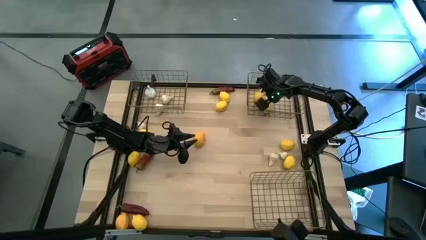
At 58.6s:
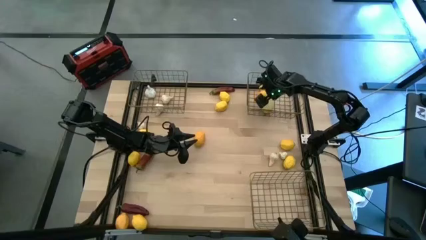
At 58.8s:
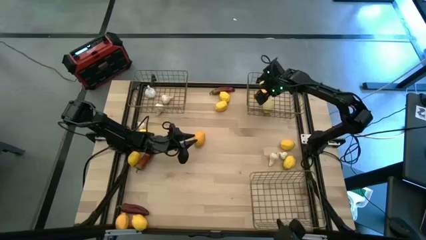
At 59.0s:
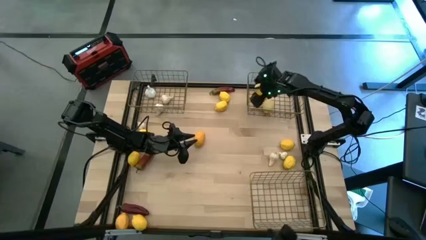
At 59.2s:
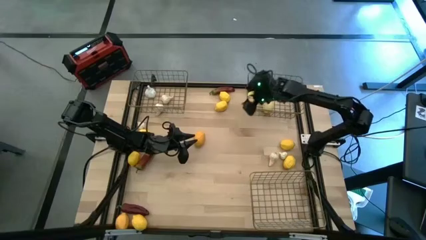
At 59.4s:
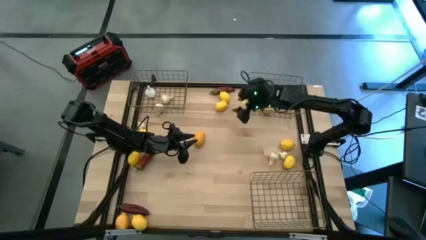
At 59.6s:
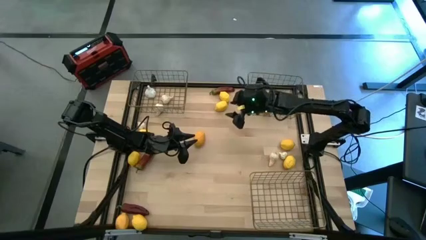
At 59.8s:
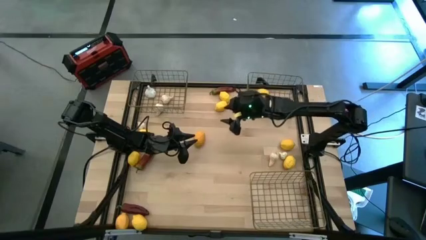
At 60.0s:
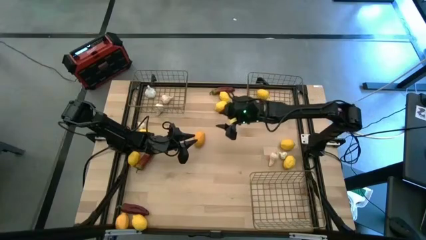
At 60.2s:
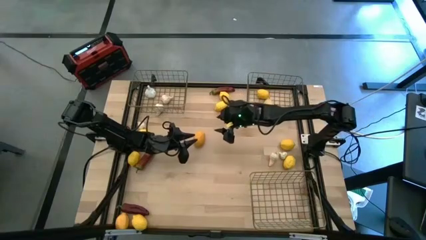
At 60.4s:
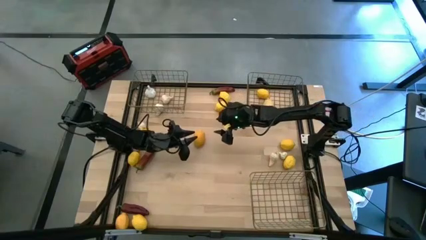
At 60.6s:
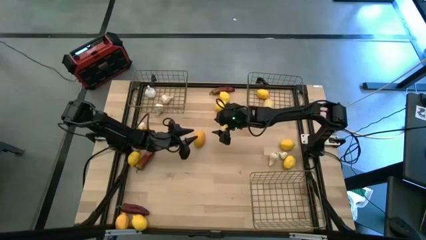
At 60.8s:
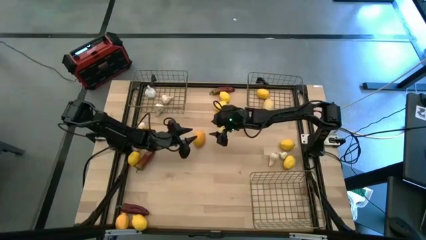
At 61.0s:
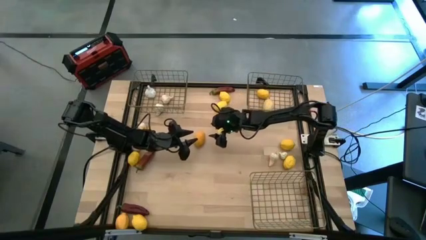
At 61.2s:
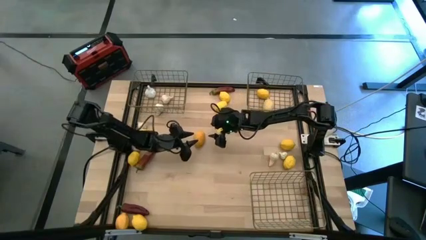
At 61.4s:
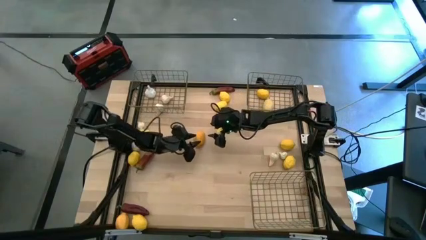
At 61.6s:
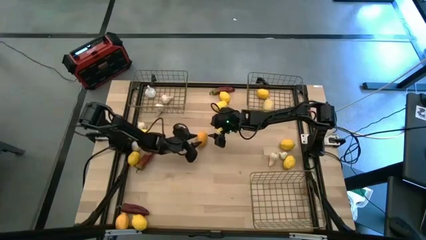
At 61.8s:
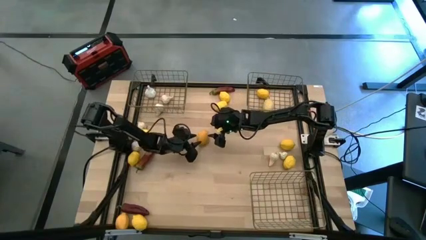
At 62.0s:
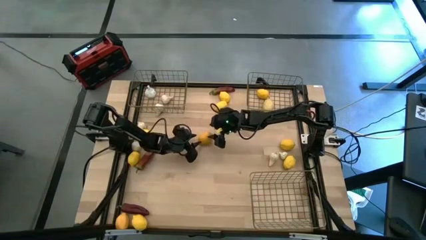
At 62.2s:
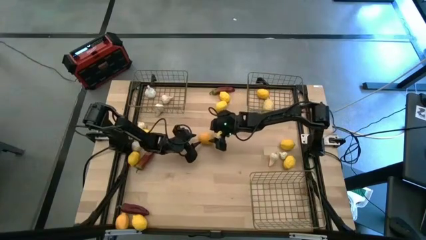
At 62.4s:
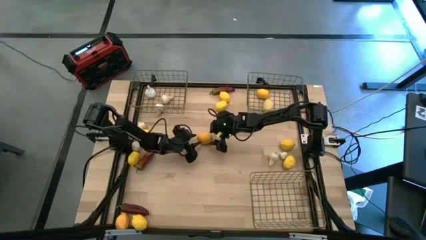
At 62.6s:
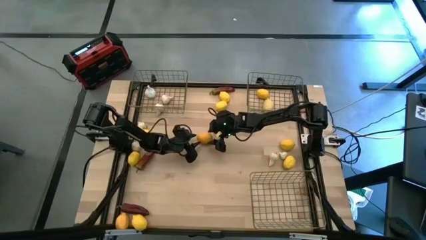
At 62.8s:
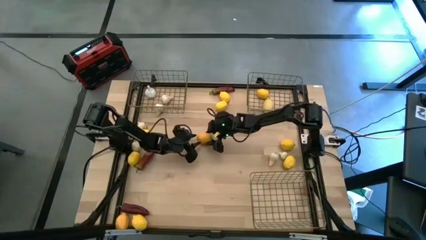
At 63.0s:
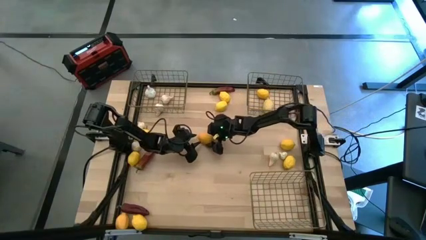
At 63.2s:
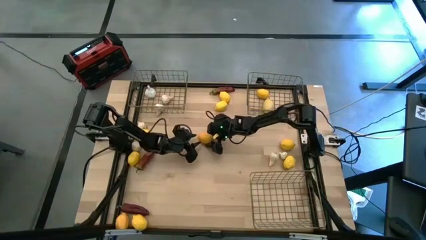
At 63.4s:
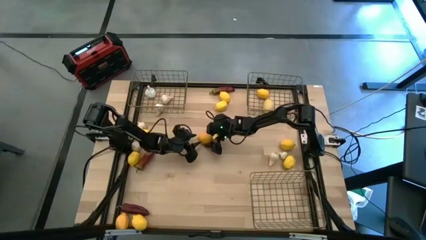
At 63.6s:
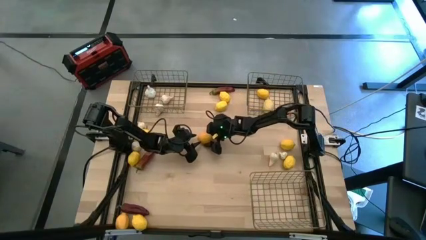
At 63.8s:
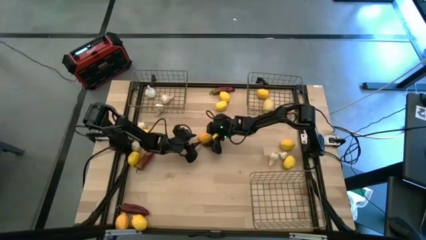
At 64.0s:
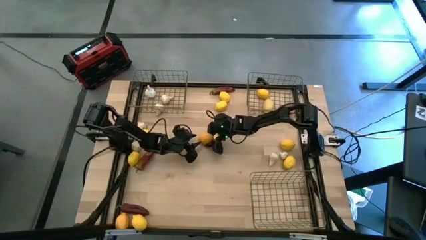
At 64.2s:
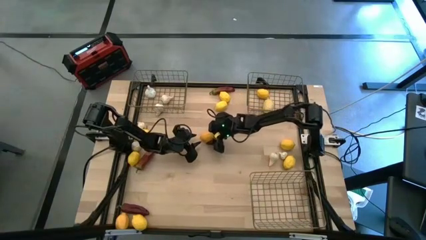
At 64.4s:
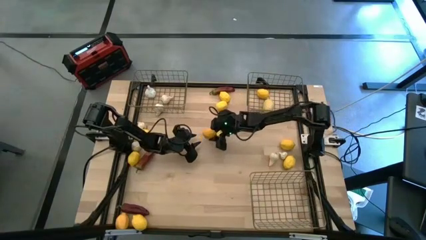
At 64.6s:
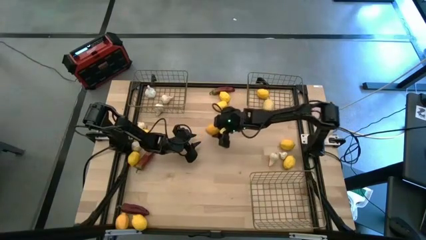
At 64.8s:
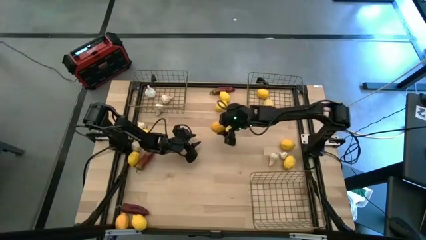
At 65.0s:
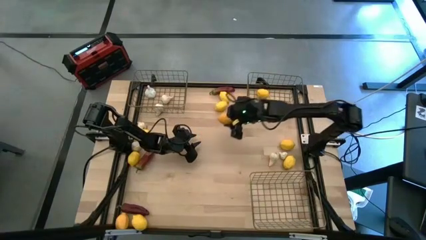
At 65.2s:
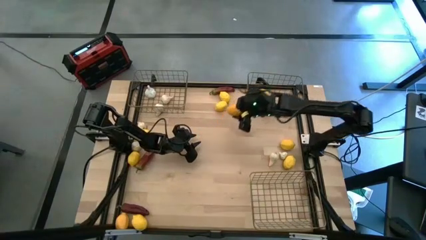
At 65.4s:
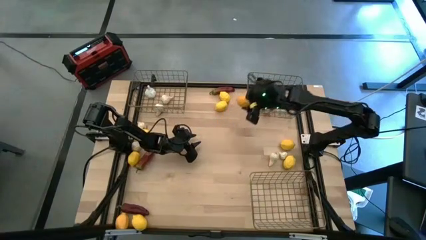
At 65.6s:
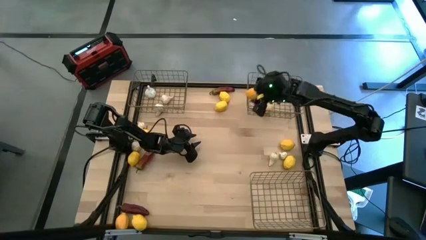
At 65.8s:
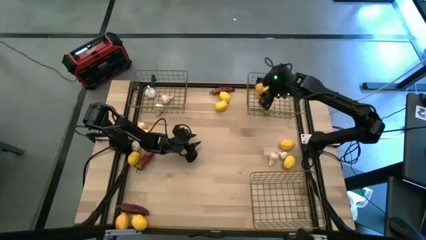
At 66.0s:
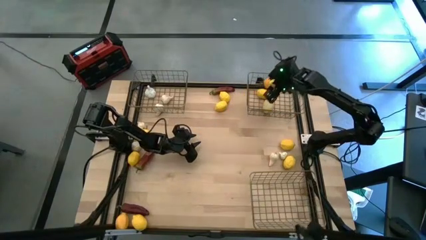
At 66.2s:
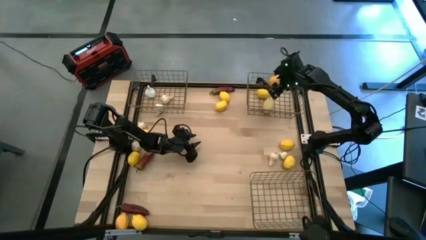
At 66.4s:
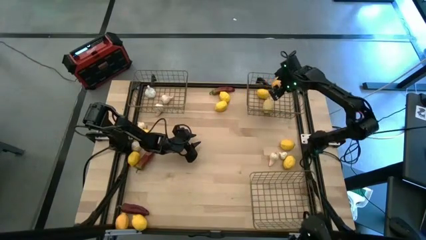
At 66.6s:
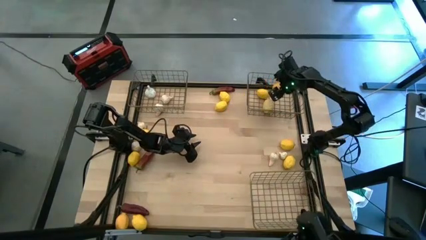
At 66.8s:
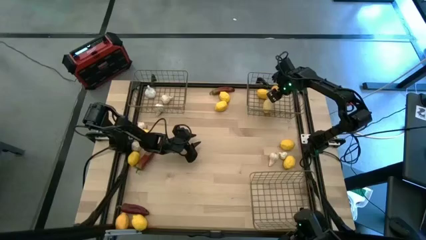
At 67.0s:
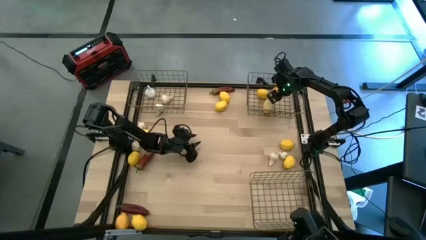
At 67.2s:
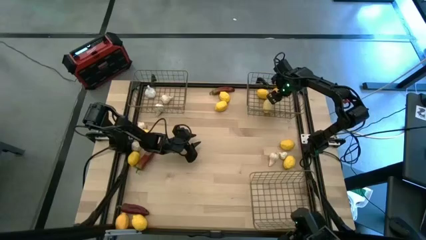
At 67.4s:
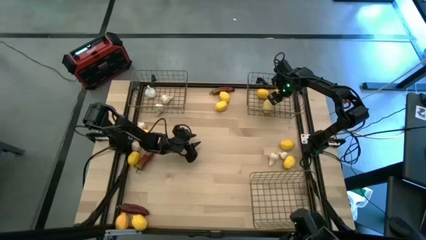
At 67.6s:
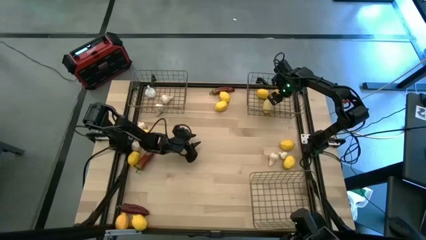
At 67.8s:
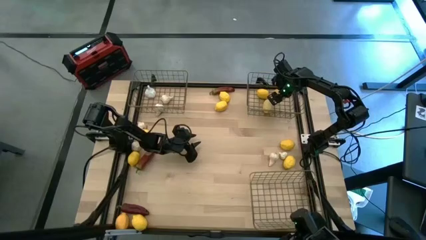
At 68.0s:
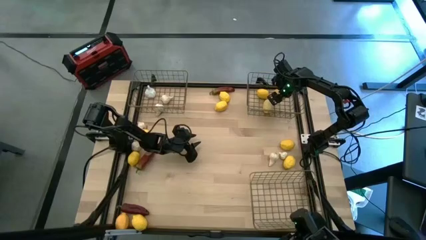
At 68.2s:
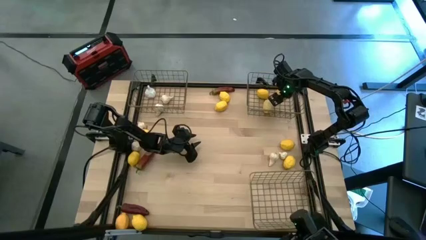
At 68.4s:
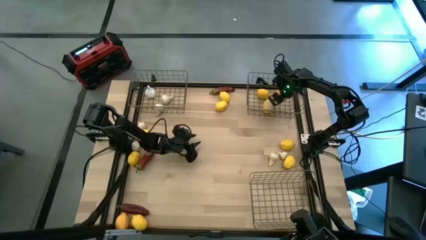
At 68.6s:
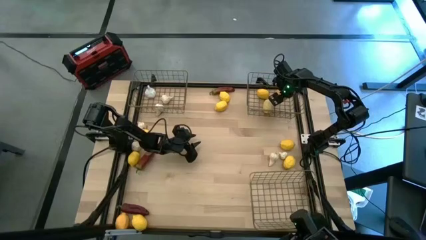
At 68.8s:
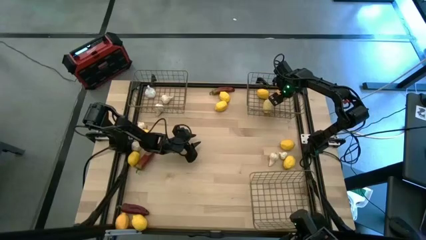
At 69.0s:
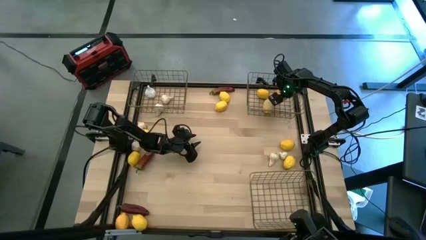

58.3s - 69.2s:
Task: Sort produce into baskets
Put the yellow lemon into the top right wire basket
